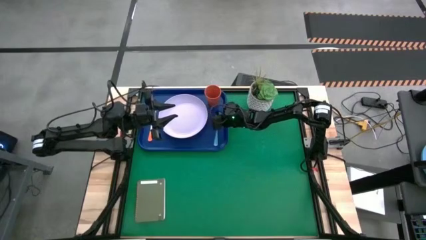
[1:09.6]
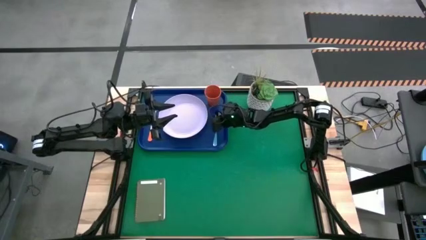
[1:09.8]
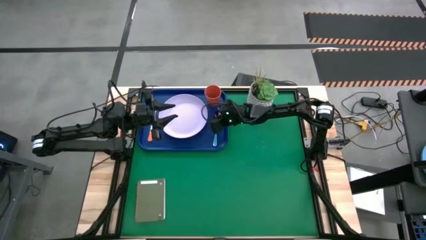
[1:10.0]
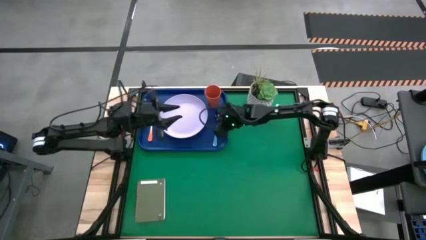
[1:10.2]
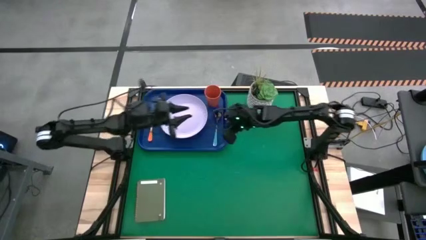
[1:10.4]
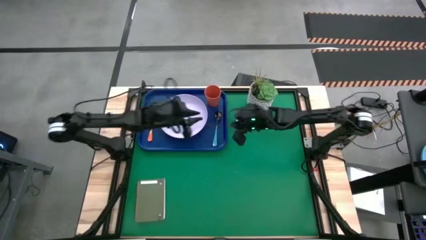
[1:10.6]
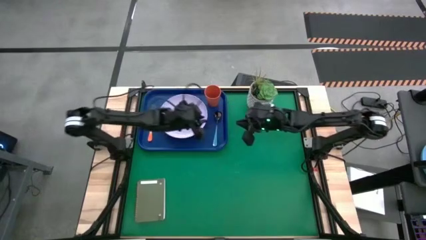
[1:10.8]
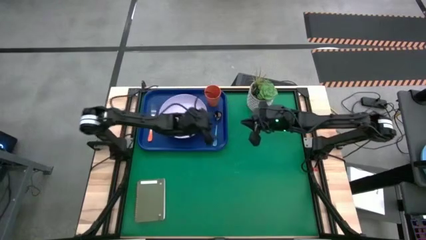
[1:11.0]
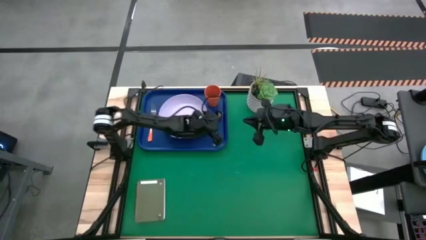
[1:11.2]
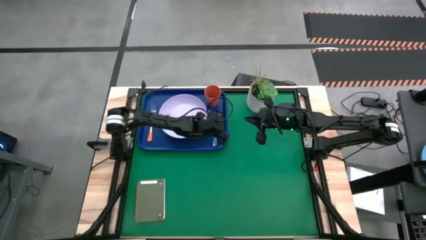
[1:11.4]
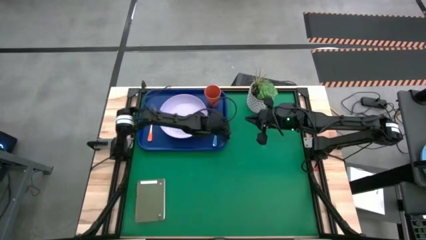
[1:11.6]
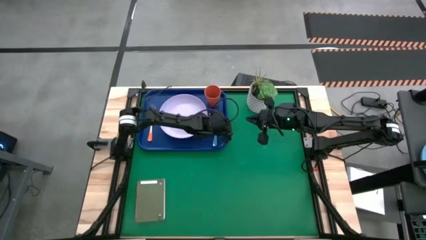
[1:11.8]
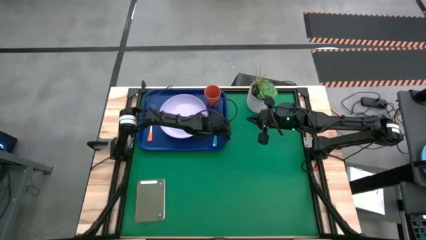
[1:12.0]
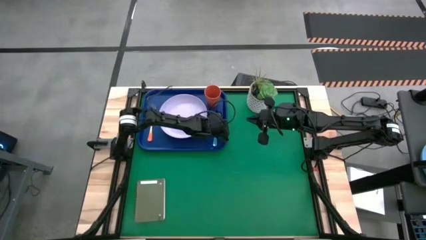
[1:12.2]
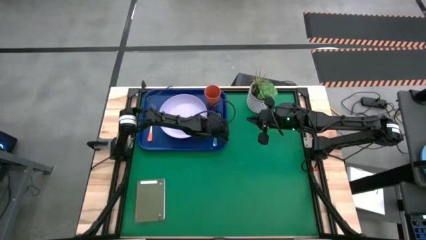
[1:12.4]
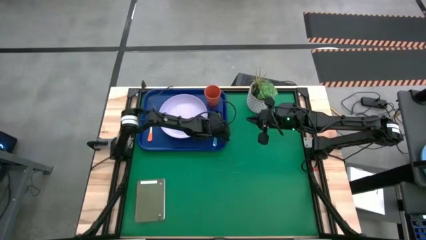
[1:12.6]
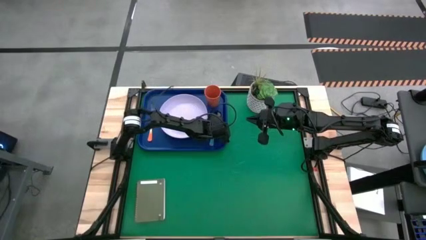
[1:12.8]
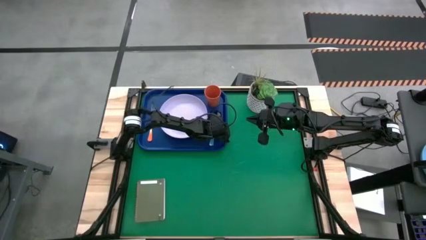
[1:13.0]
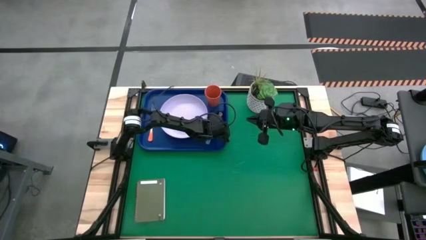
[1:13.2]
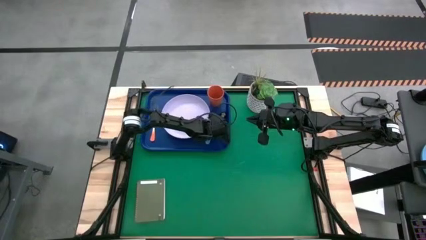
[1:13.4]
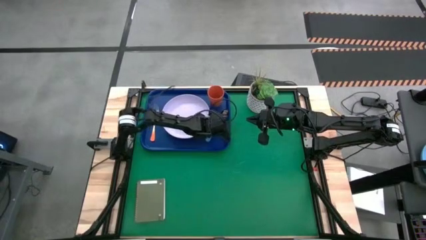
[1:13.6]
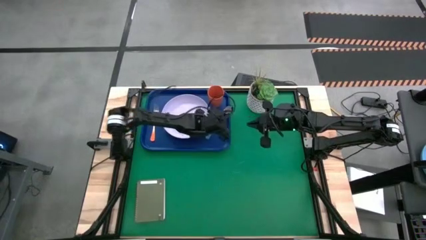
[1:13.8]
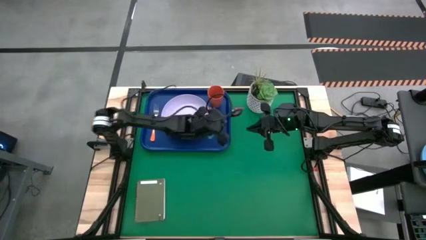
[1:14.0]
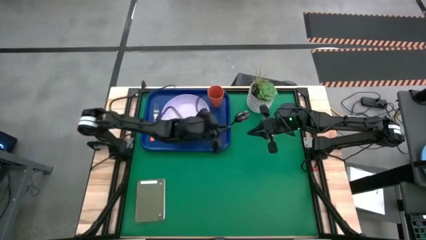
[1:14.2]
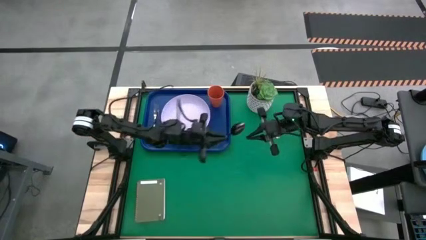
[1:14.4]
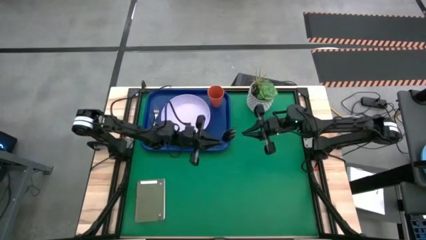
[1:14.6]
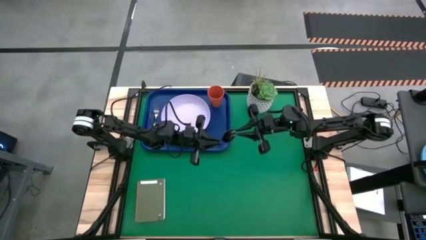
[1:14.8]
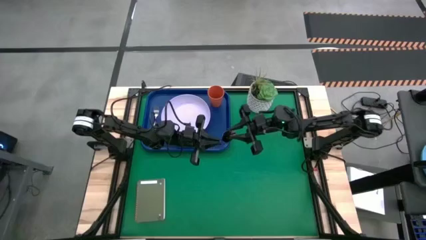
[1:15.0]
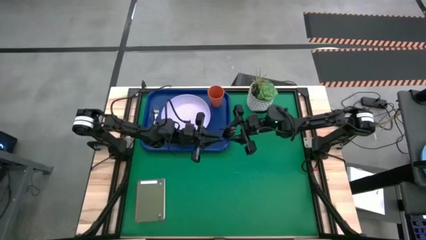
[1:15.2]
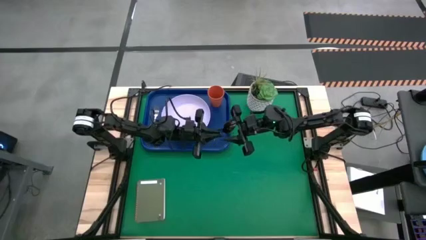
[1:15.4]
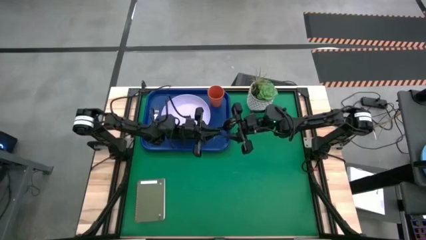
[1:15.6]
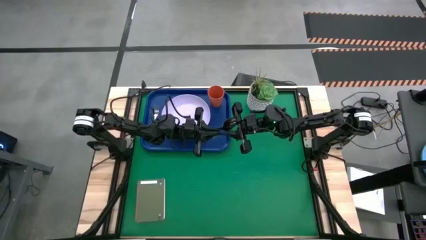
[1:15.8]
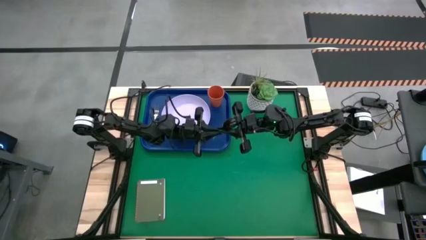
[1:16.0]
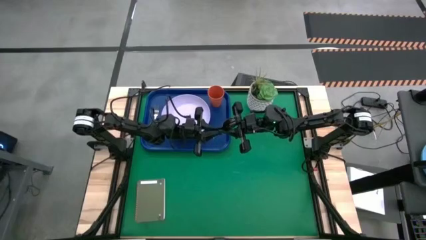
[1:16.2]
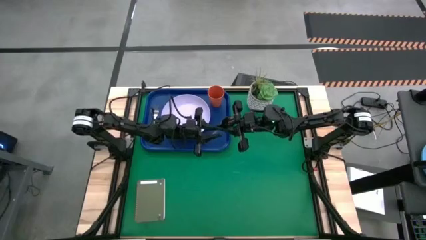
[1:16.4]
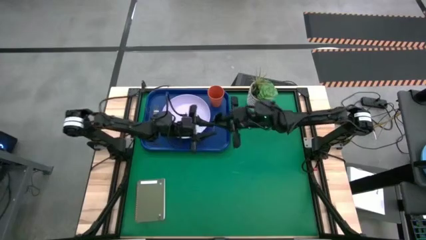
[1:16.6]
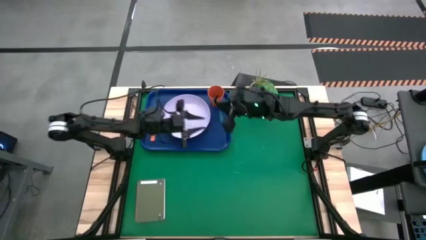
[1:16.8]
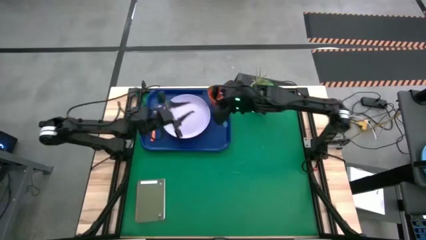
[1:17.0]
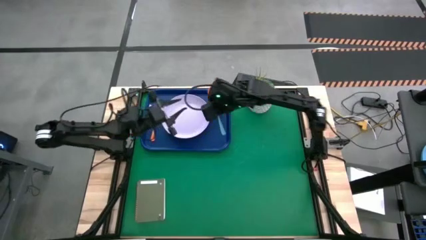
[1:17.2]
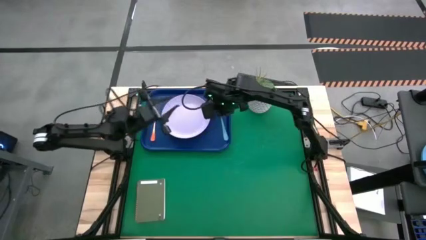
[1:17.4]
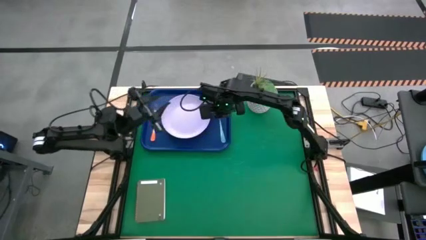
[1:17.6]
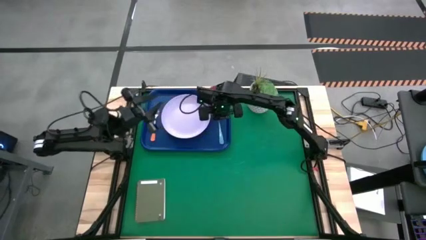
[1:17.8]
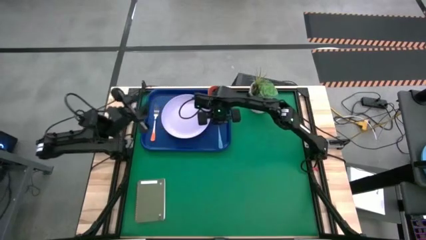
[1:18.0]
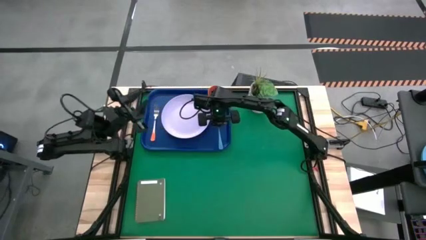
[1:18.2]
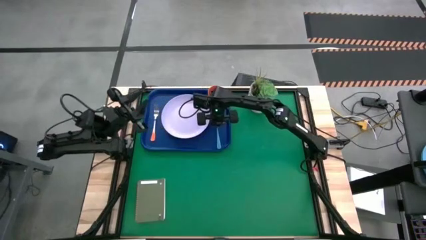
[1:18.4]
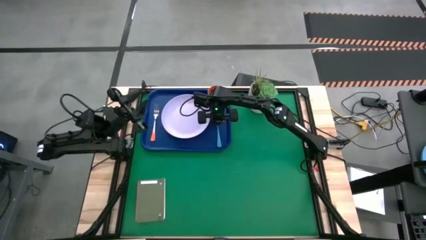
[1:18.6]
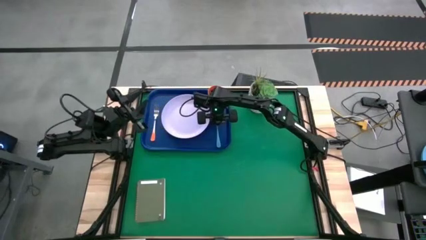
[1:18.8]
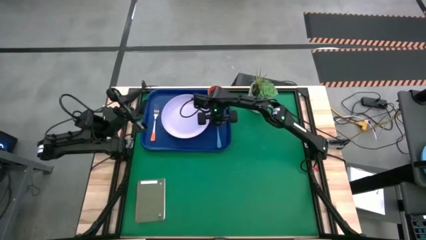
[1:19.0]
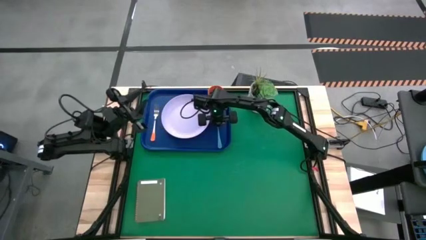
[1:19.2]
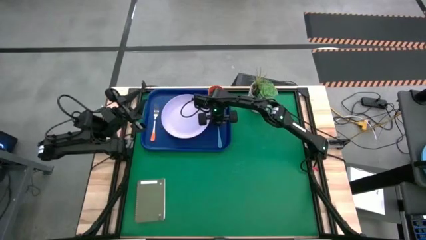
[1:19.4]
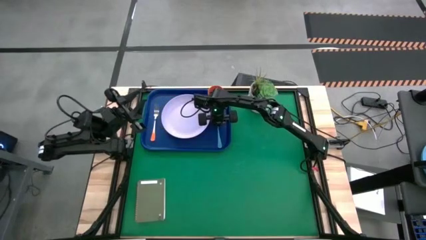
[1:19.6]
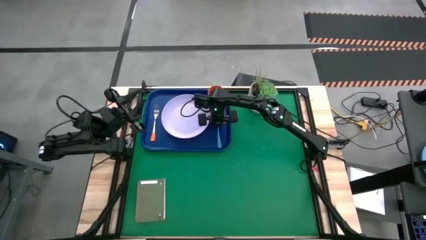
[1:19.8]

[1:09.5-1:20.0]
Task: Pick and place plate/cup/fork/spoon on tray
Put the blue spoon on the blue tray to the right of the white plate

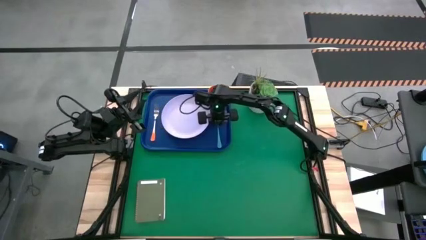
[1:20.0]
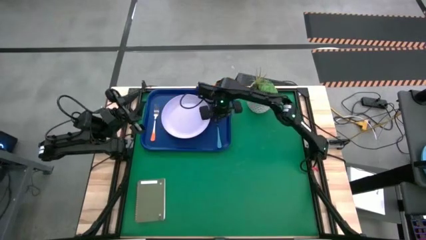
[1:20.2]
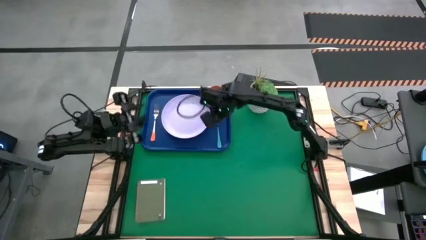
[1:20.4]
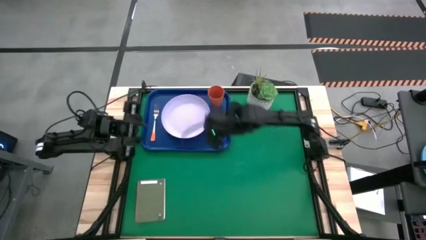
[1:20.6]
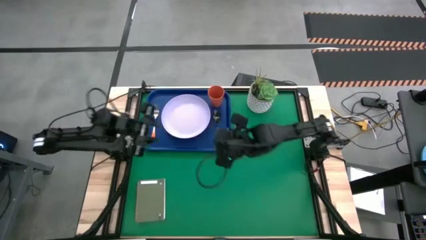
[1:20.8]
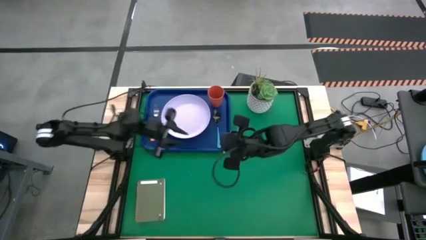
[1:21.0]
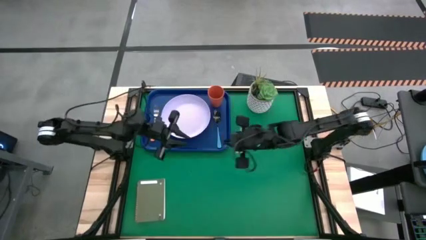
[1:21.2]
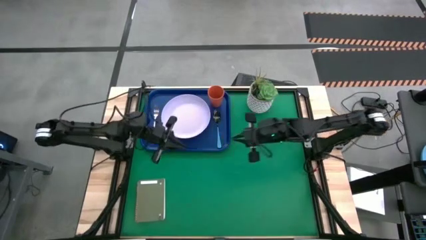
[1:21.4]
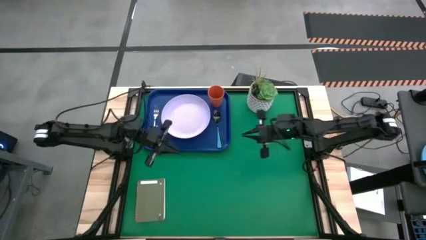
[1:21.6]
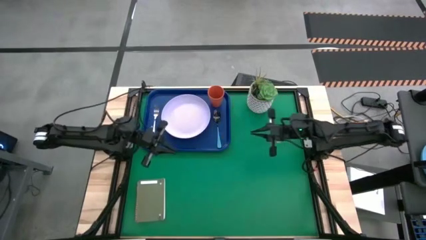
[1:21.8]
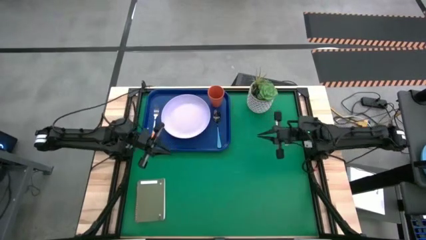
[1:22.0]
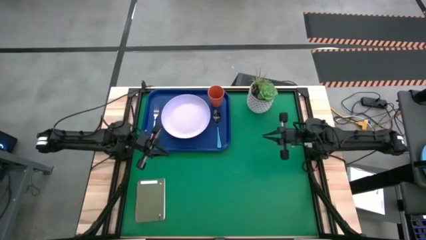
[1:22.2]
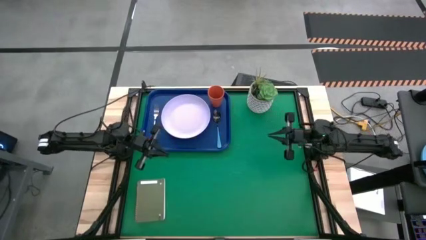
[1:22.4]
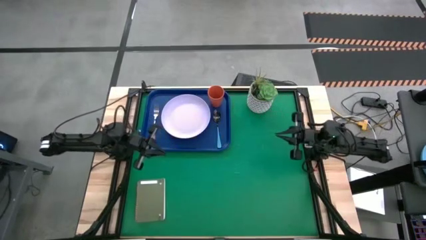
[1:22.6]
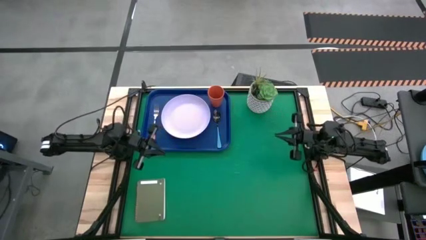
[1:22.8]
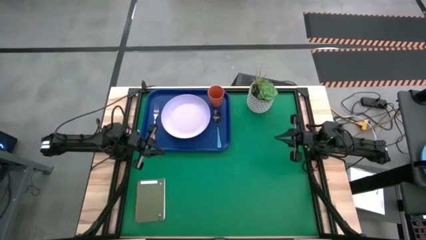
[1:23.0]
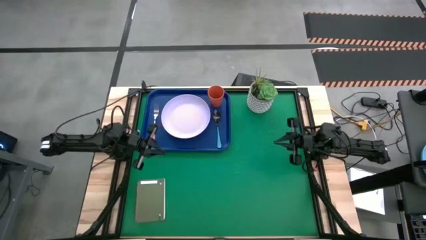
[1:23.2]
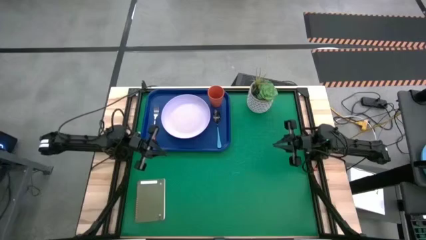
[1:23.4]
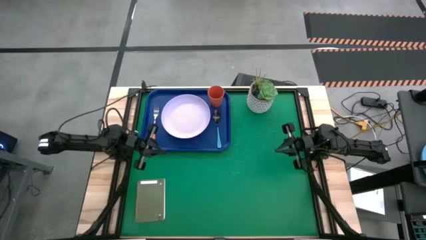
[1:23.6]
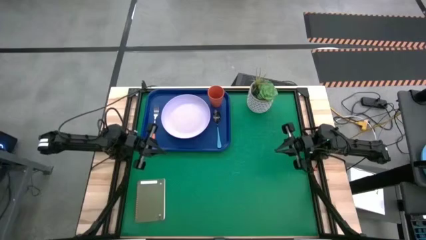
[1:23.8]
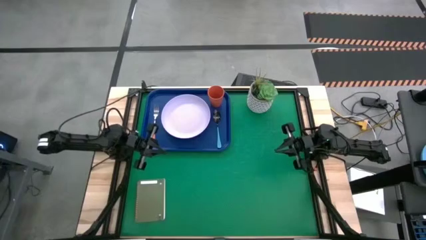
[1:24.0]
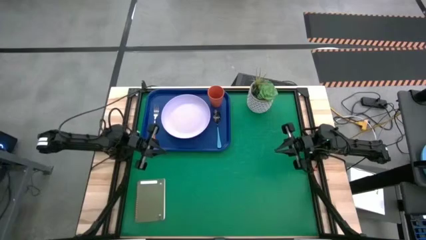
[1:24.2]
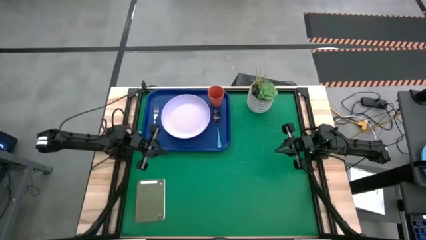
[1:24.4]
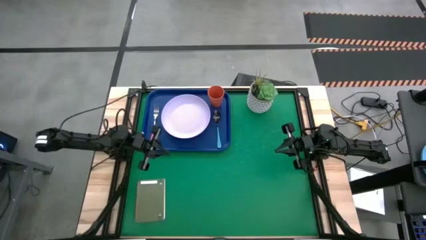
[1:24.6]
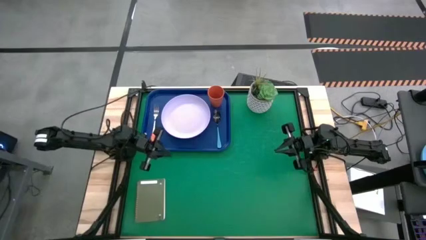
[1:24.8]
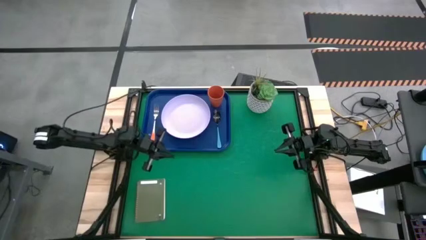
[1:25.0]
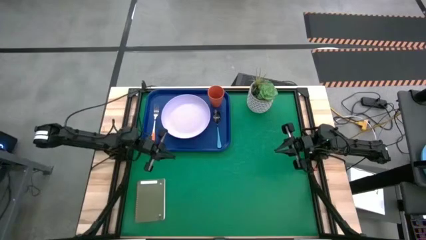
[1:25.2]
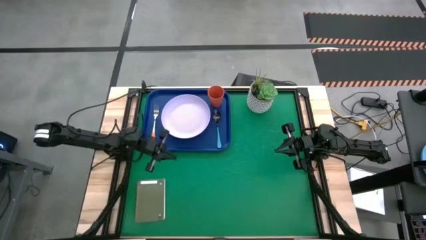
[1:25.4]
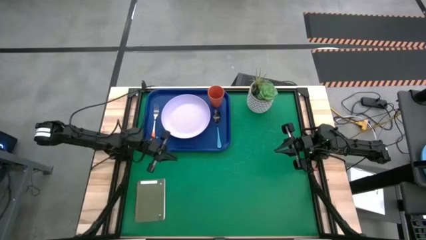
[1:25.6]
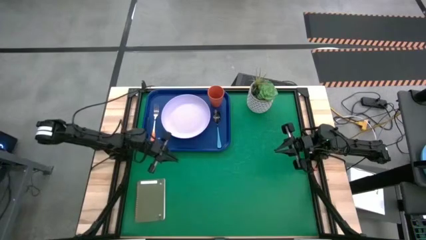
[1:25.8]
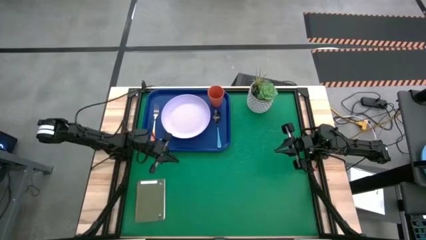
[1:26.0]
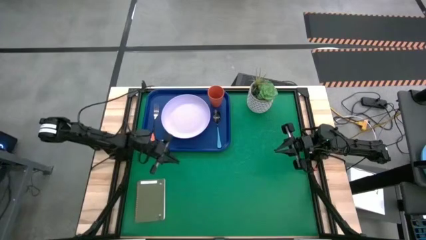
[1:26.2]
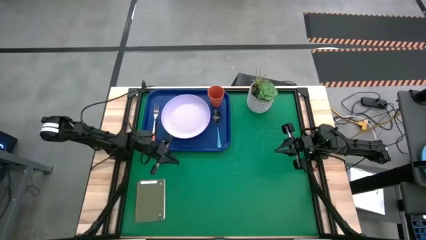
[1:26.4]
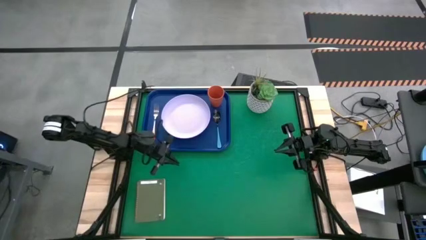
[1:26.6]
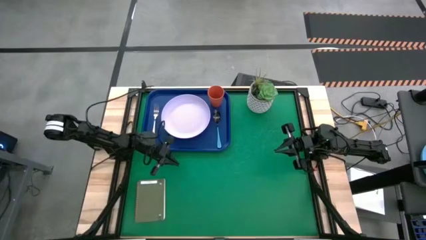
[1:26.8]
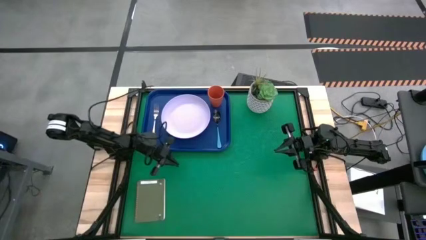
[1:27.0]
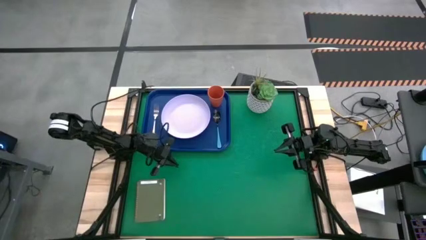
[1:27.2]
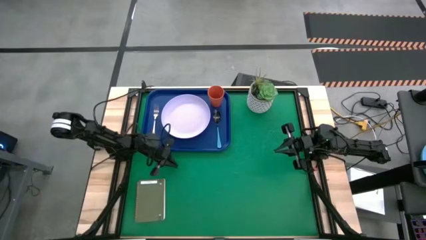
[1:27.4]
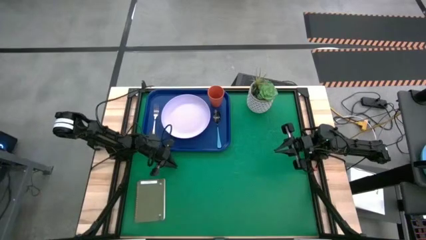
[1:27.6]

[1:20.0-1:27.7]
Return to Home Position
